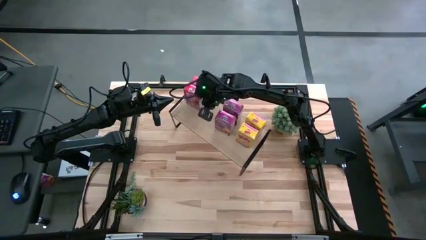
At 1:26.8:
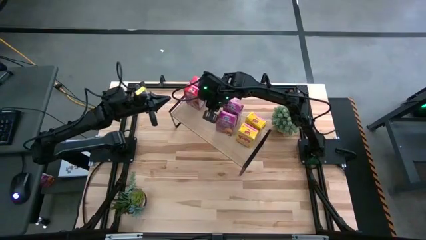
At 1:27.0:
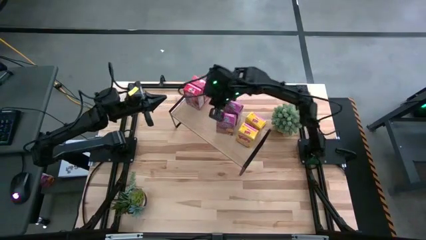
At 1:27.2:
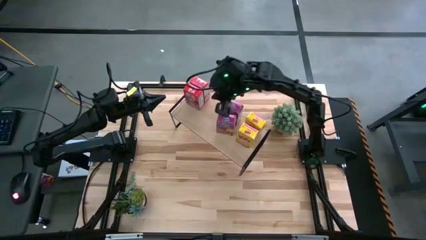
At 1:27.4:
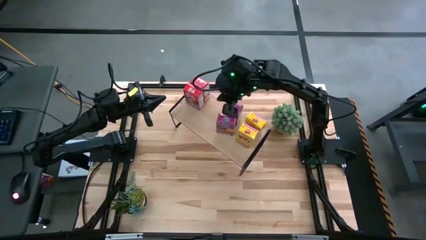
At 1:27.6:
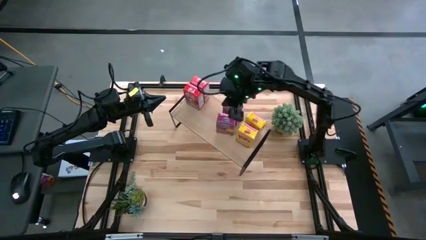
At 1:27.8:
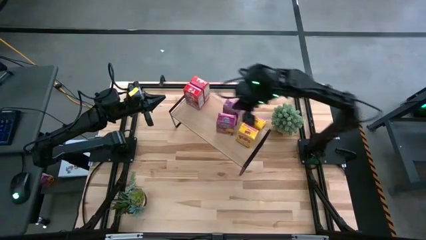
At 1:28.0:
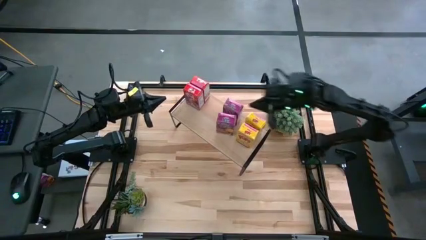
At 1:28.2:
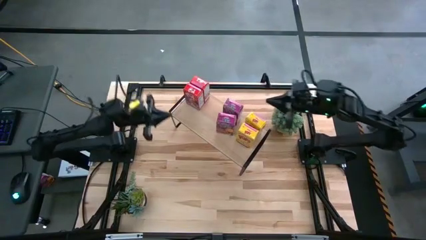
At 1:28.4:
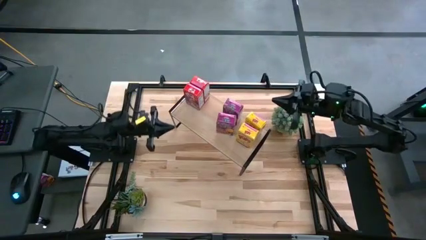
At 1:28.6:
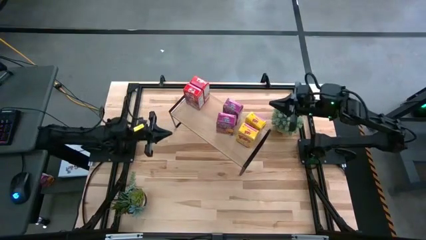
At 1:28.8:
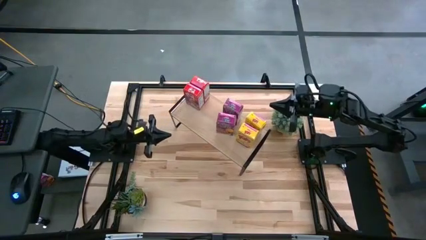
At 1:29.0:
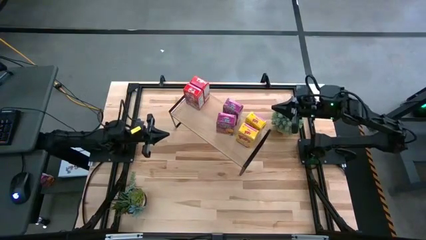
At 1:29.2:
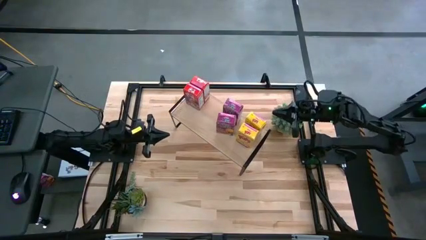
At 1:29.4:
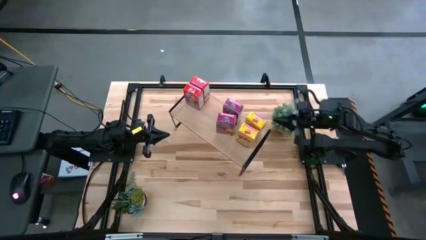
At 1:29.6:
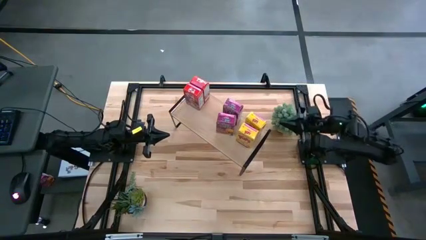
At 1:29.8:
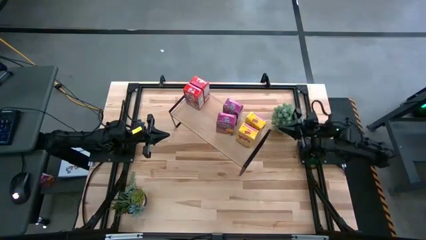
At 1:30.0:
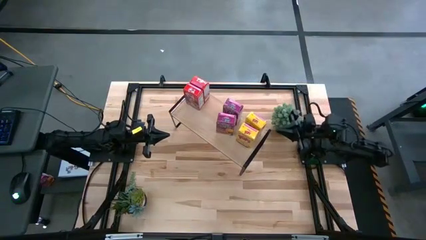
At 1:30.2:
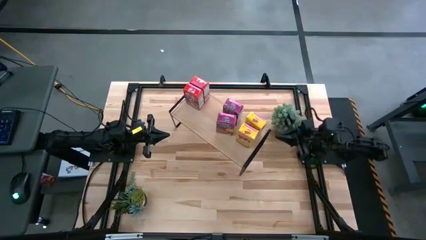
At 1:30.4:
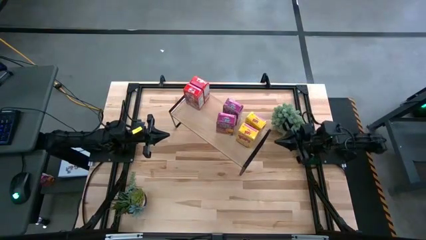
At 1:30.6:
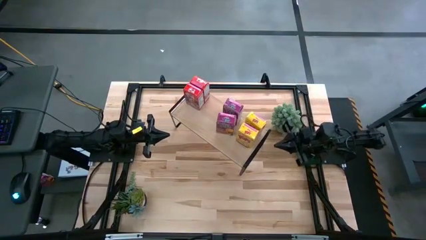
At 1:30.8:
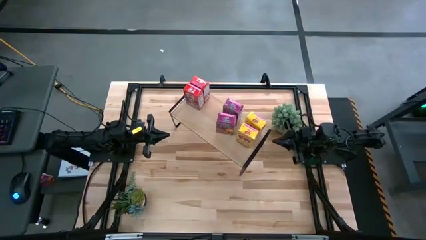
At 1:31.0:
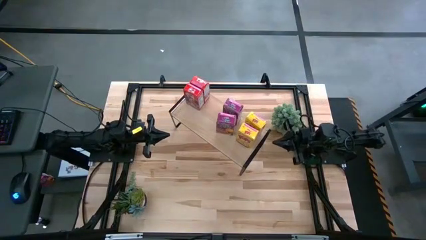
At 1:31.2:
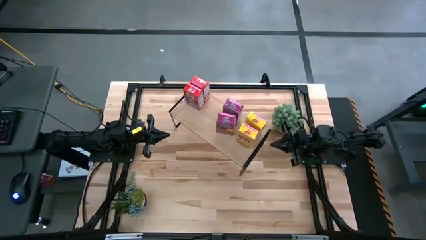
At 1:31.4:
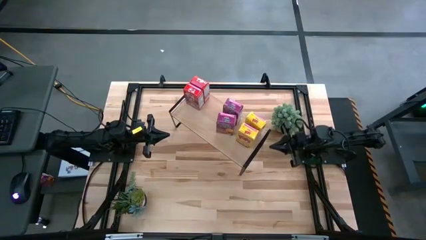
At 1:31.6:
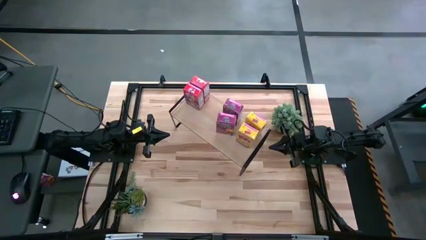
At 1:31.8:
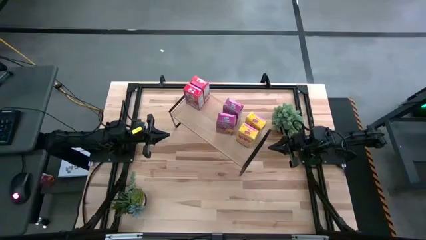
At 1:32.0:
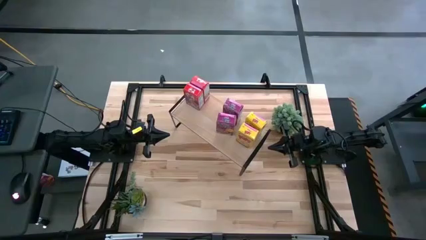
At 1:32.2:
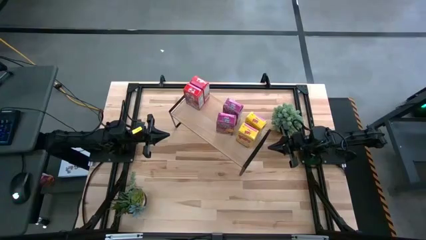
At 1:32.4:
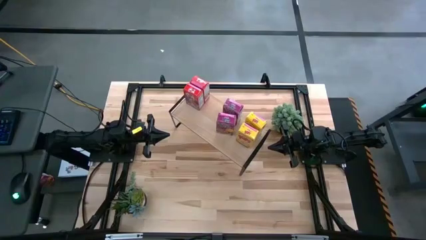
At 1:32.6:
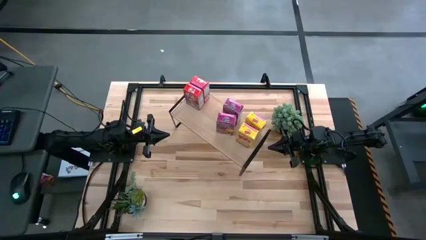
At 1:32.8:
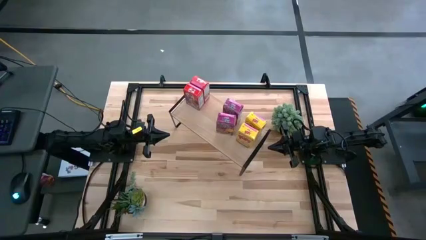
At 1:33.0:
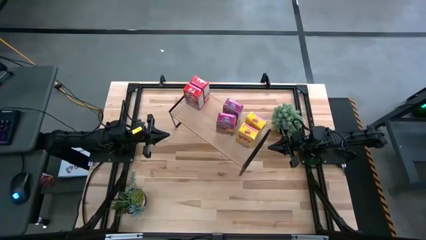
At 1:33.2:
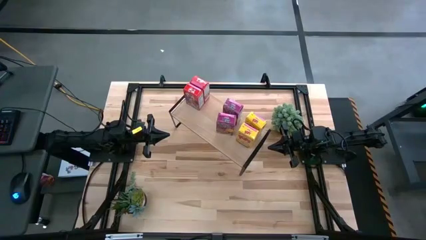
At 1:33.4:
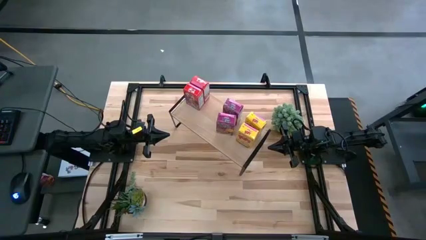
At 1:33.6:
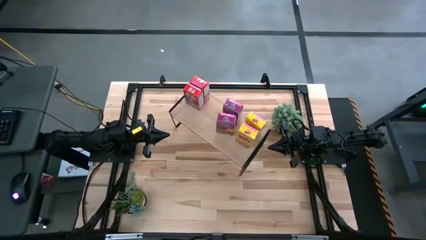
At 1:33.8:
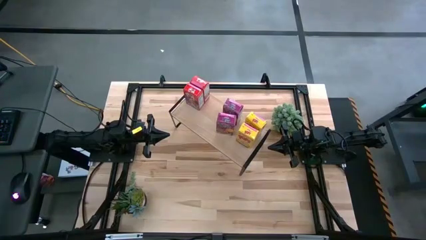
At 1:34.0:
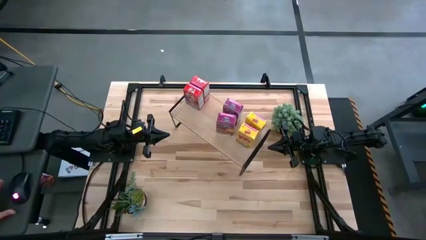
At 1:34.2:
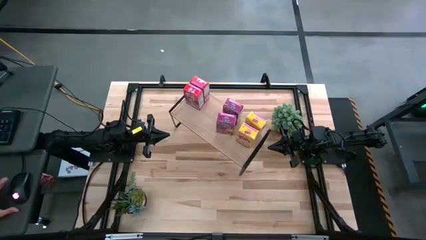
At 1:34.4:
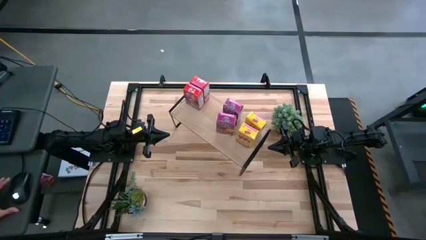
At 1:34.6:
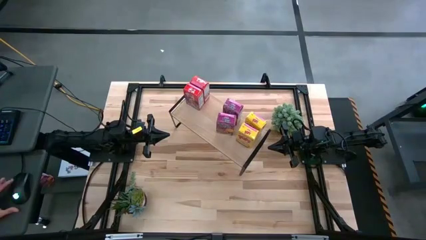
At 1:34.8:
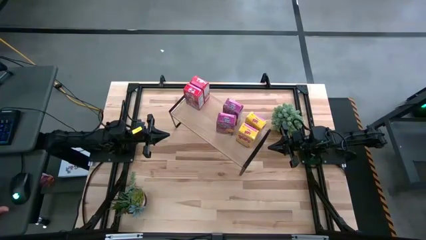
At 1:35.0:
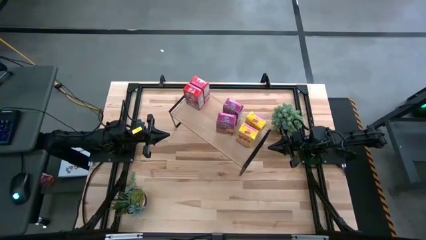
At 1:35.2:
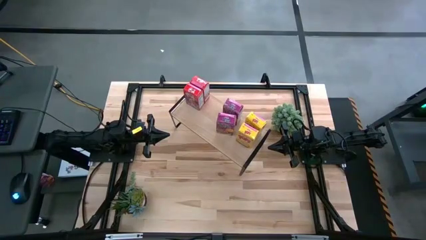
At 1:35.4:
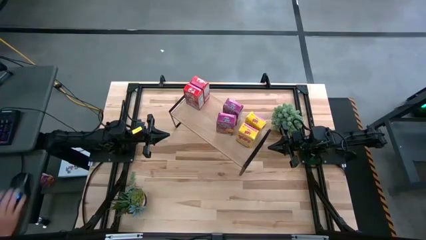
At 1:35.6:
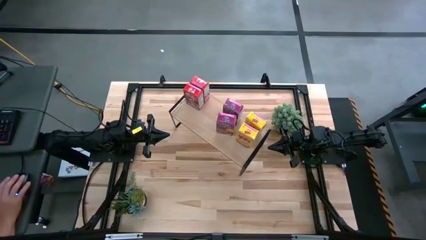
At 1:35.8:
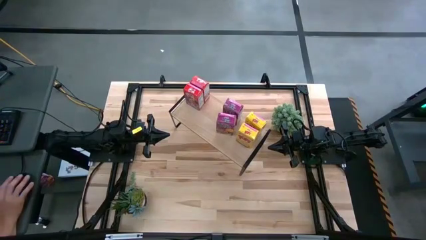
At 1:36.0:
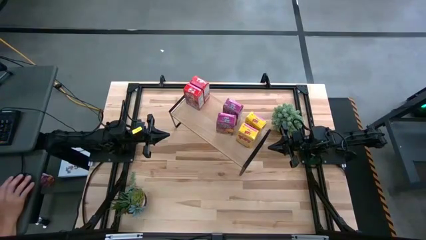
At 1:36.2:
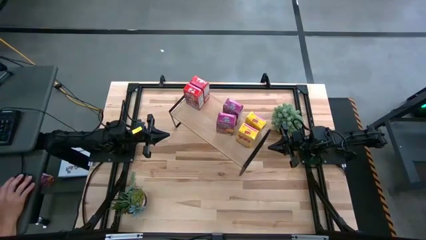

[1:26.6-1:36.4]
Task: Stack cereal on shelf
Return to Home Position

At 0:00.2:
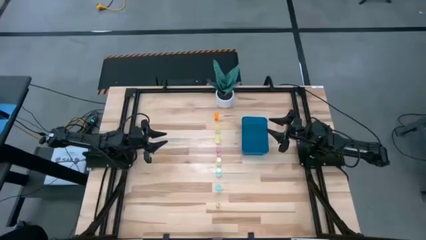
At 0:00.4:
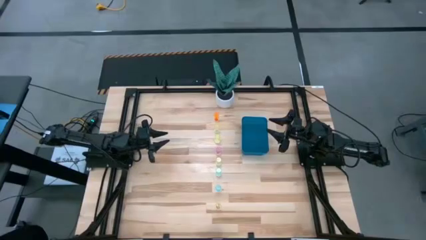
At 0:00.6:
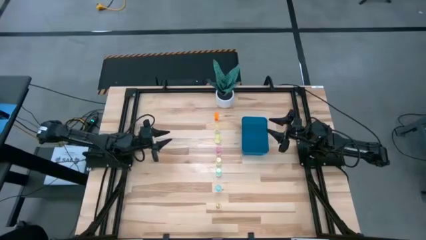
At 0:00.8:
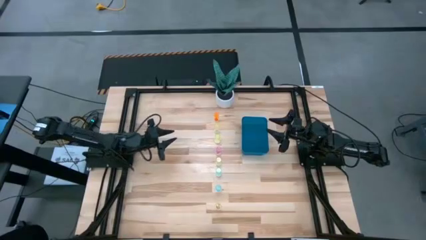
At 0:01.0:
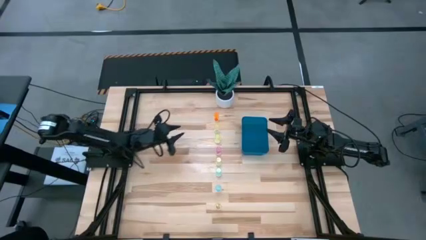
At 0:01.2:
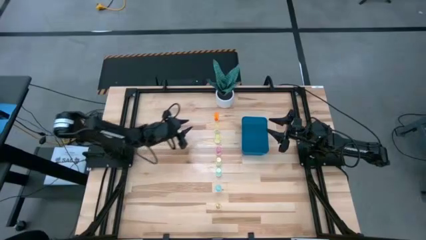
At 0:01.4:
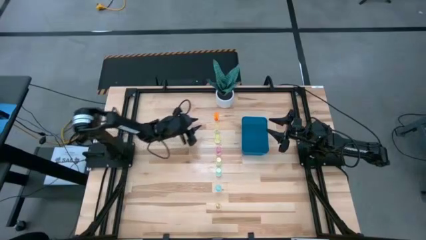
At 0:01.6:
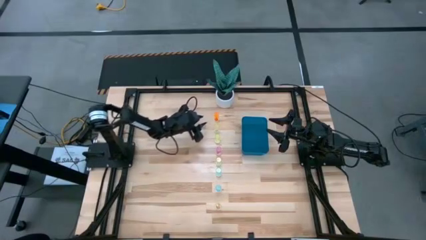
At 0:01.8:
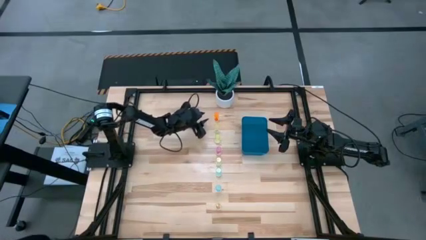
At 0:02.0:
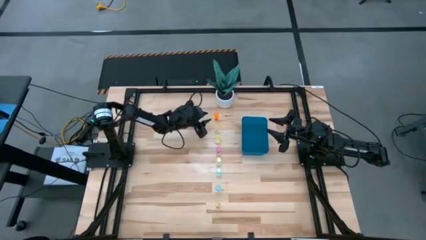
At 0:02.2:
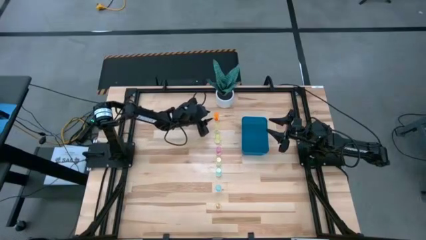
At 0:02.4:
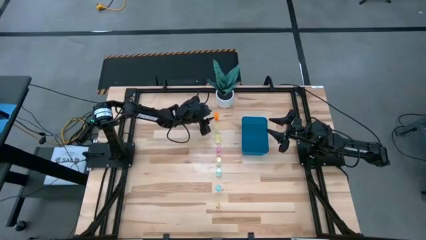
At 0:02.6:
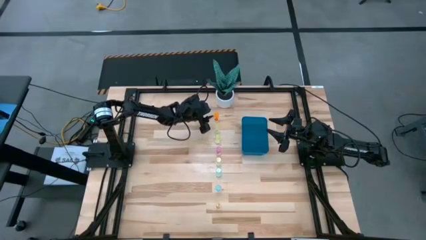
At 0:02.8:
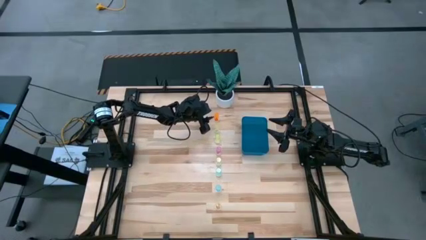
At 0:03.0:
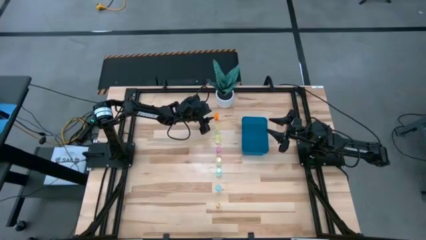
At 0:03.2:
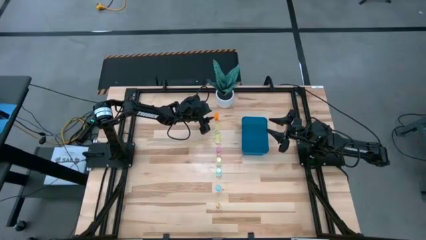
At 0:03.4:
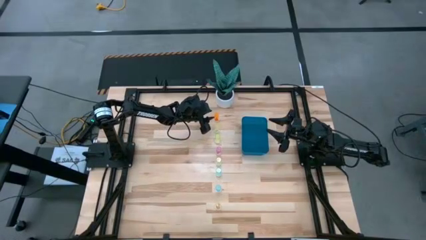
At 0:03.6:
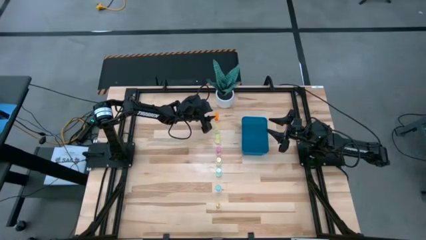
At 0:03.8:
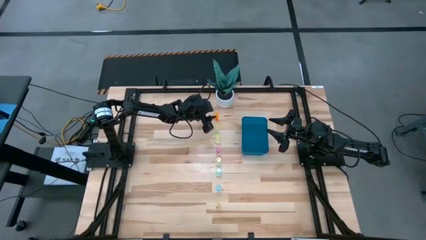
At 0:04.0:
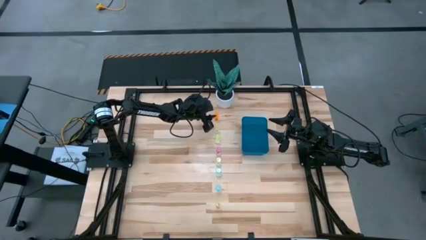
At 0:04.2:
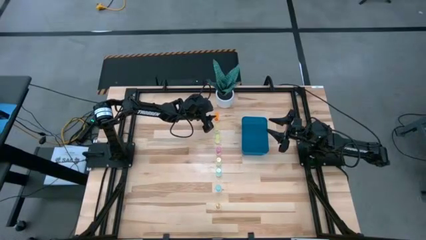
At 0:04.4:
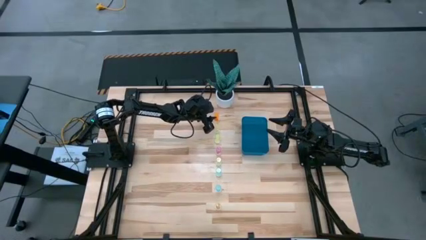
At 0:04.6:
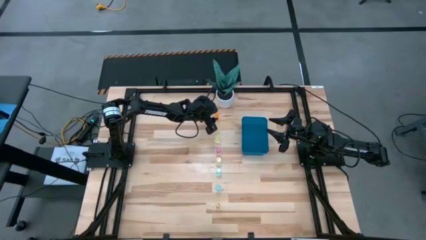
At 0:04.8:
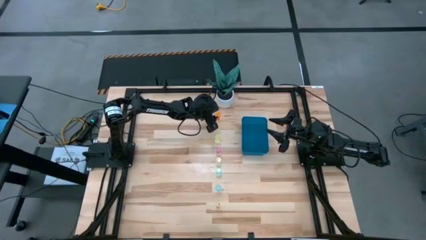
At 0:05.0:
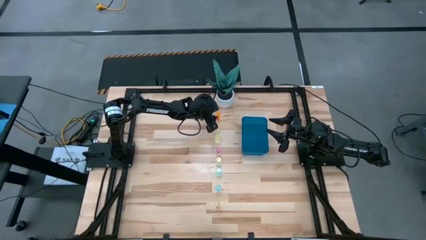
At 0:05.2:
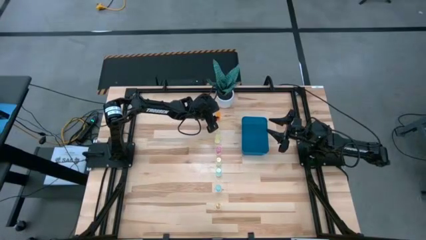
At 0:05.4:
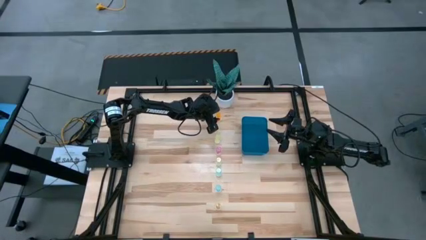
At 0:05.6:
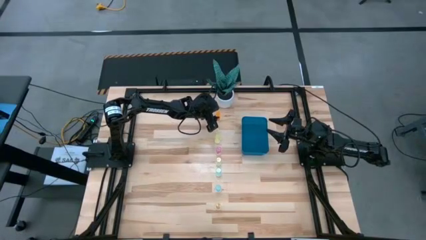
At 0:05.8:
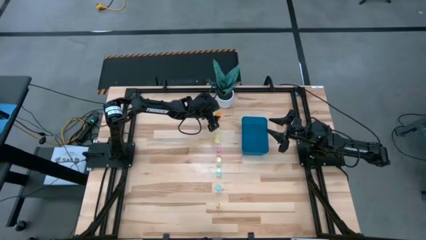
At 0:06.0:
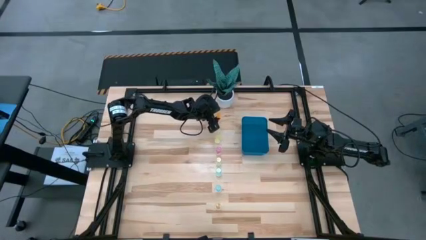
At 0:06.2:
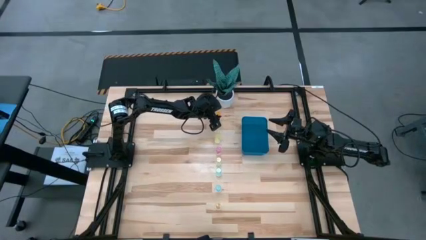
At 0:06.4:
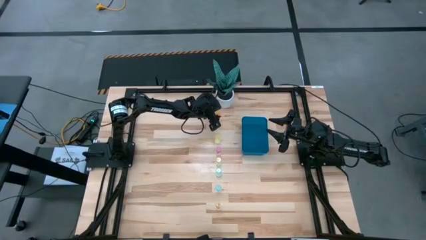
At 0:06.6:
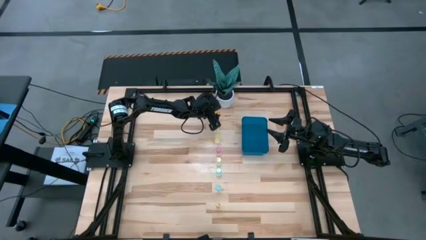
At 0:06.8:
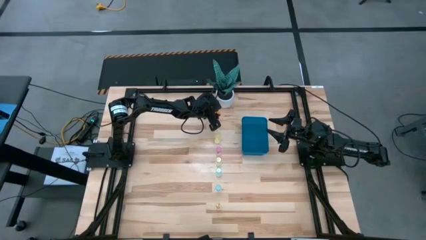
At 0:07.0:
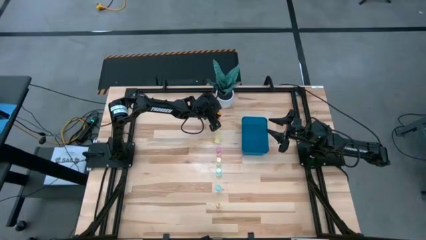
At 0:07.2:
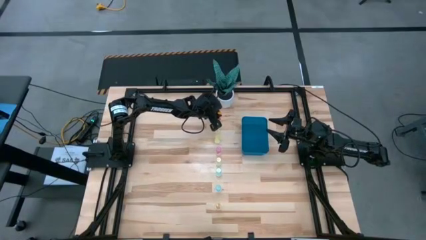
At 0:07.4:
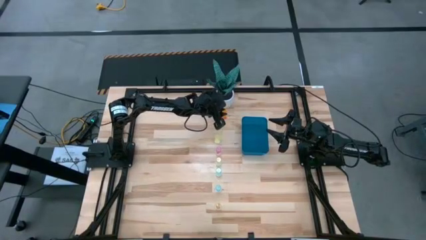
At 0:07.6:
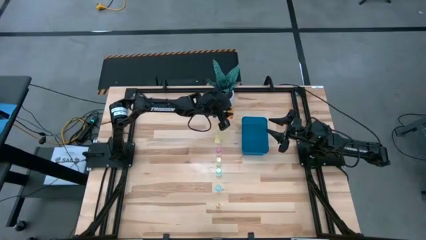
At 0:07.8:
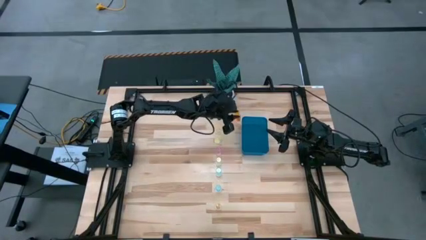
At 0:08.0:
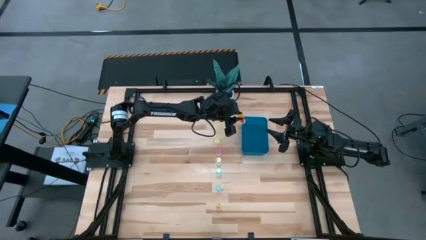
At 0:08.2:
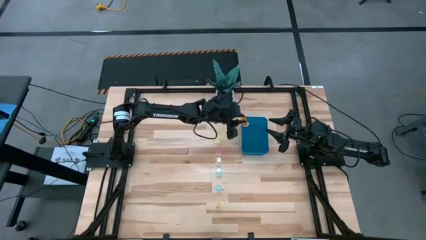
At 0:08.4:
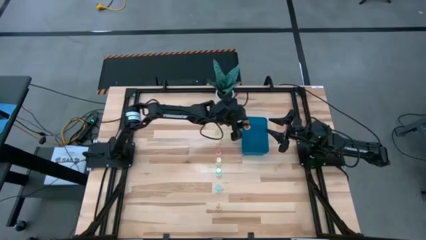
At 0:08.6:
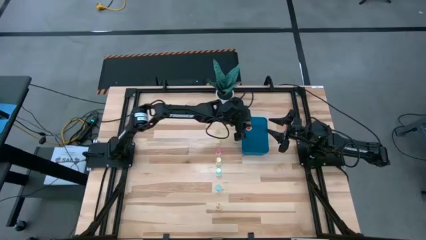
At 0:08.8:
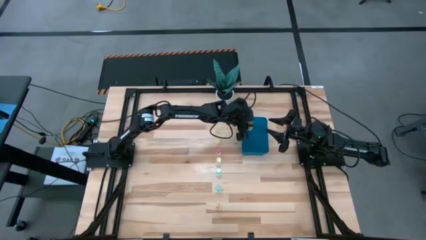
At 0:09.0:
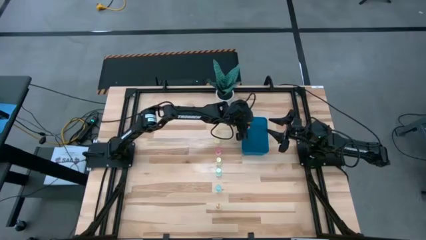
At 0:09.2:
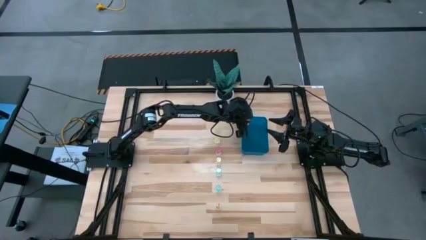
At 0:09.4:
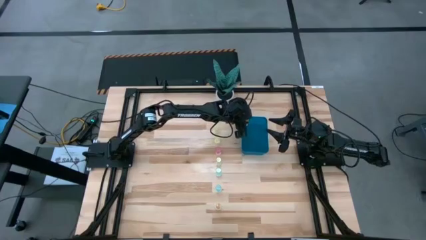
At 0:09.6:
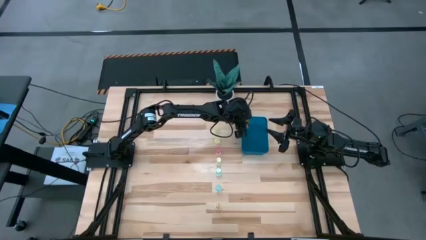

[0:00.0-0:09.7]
Task: Pick and place pill bottles into a basket
Put the orange pill bottle into the blue bin
